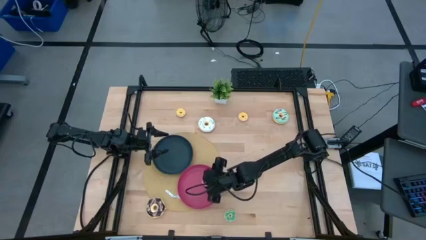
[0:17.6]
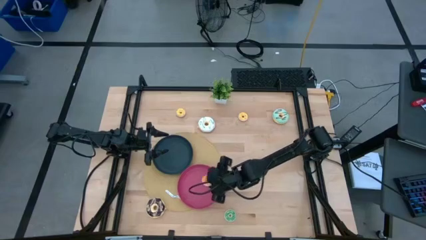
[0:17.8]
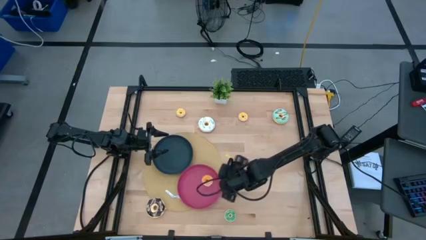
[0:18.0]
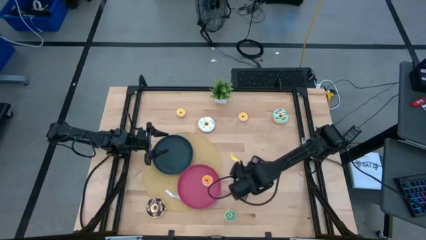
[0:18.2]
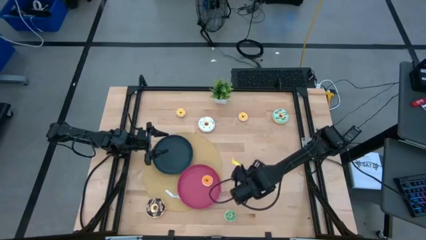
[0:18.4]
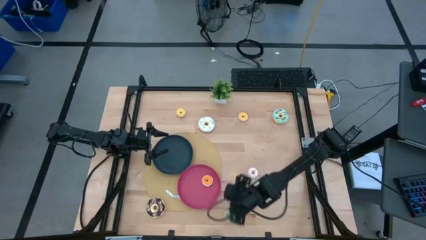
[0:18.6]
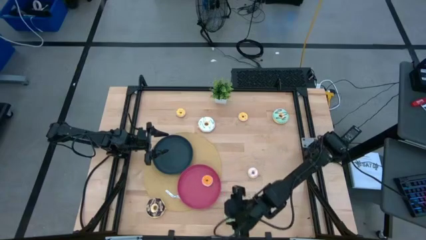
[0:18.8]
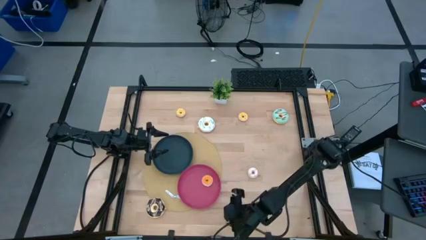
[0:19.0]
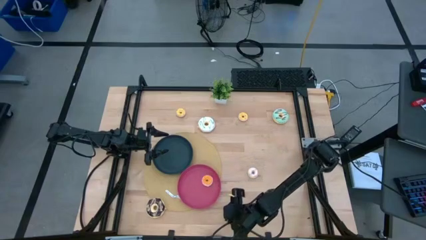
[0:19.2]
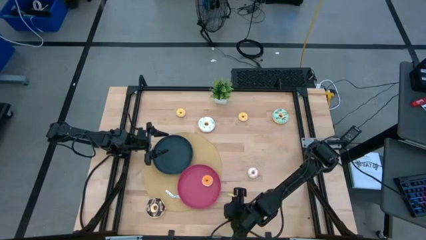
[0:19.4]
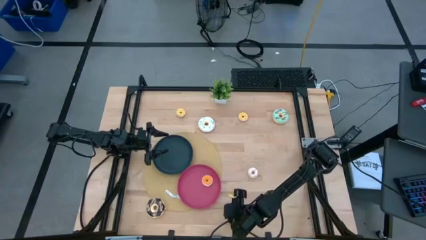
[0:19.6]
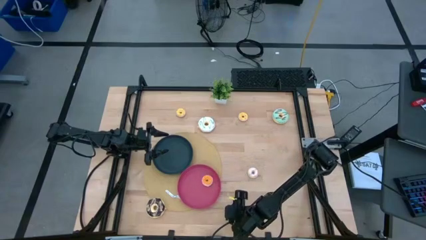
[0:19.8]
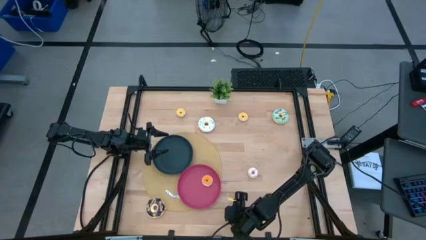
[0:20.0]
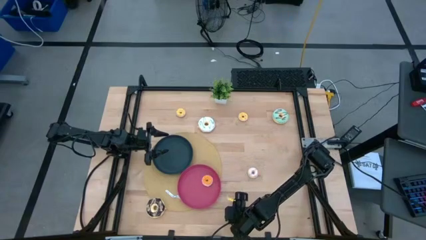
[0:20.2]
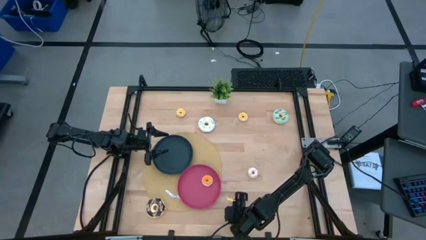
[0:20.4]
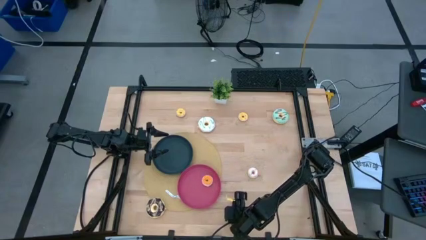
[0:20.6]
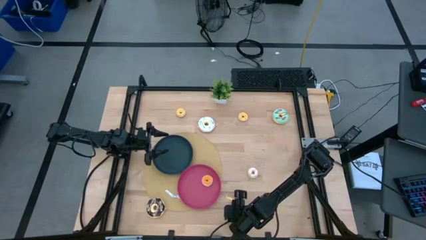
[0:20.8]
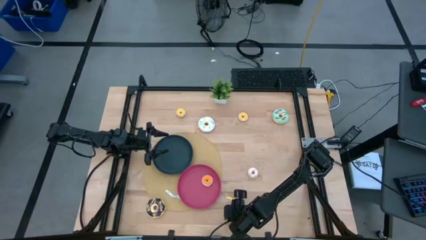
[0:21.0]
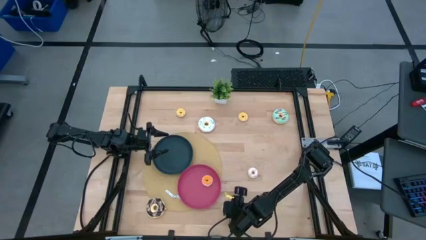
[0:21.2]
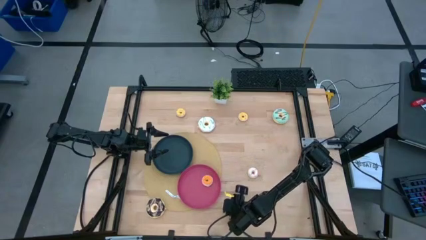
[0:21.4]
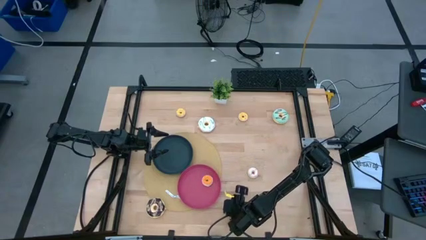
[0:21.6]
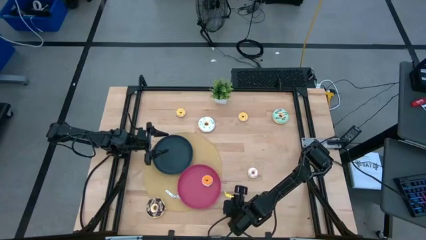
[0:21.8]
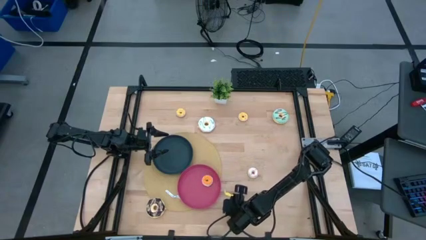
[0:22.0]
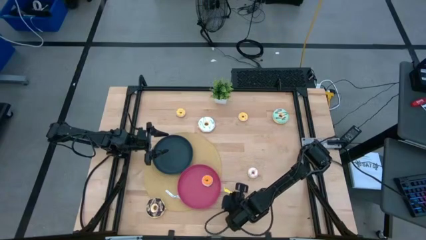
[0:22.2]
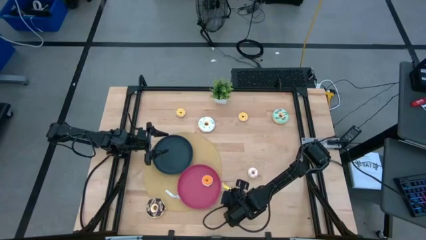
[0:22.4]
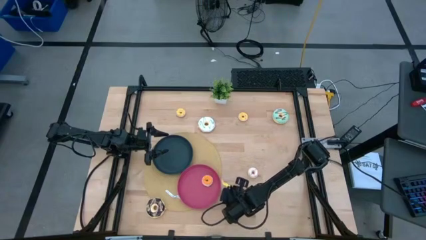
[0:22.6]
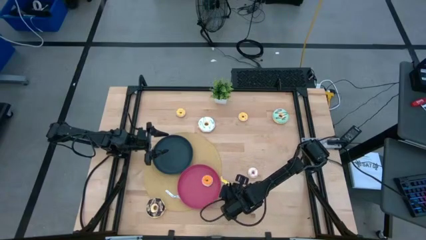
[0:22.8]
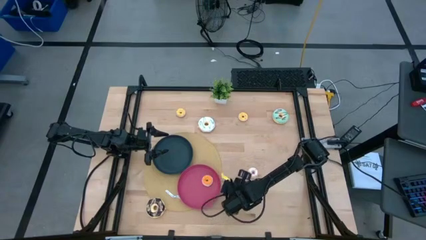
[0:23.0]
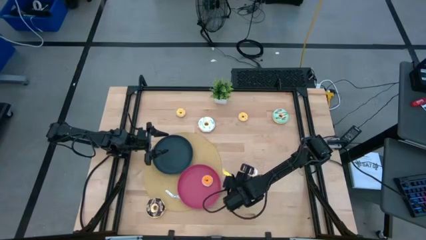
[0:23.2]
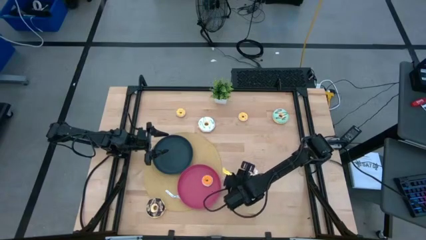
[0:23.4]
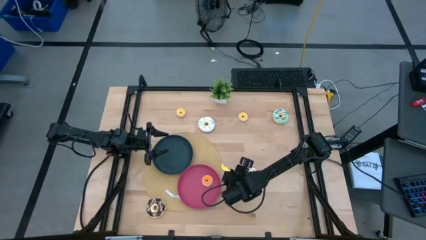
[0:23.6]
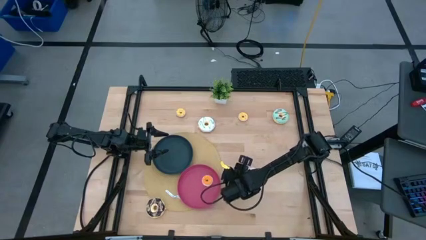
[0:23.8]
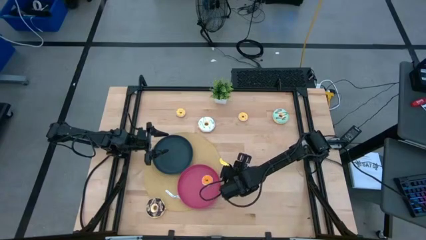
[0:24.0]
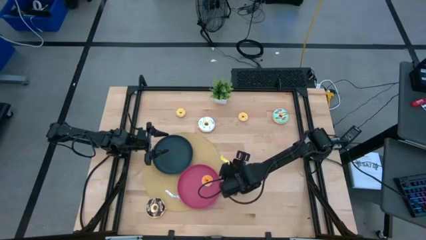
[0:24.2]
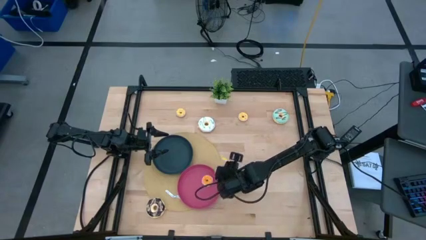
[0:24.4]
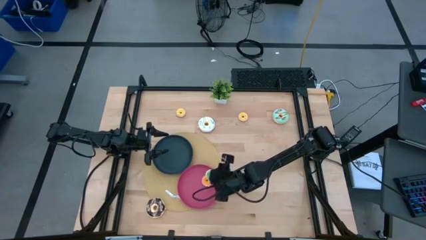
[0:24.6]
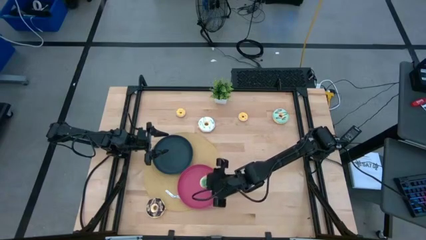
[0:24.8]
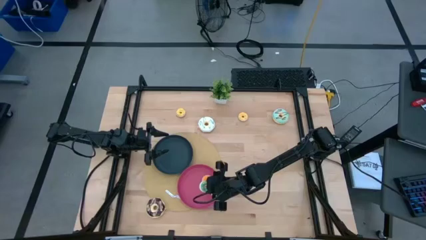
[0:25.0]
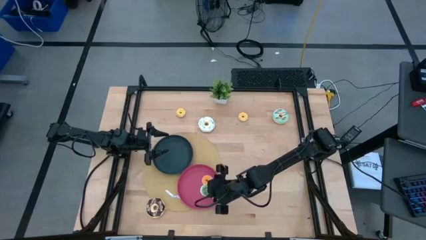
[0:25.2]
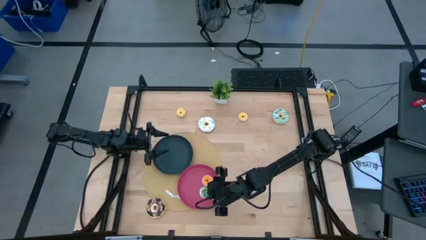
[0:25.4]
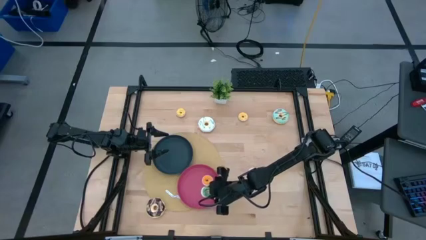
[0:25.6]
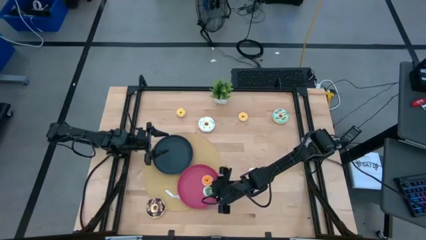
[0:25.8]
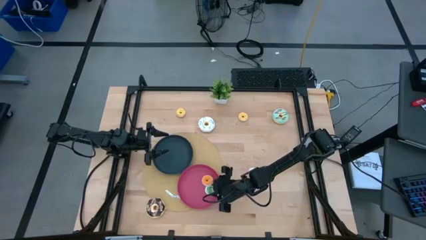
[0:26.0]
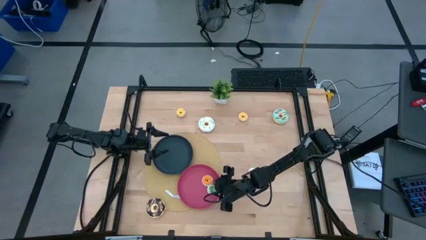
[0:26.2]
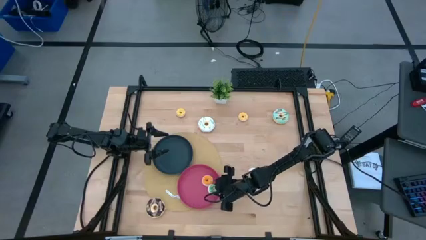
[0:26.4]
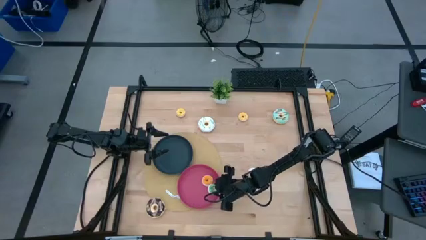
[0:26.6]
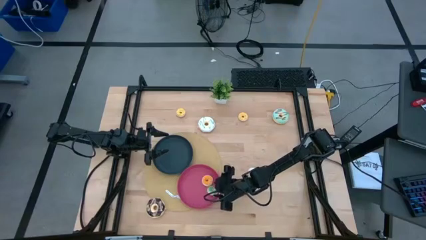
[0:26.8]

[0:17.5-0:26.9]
Task: Pick & Place donuts
Put the small green donut into the pink plate

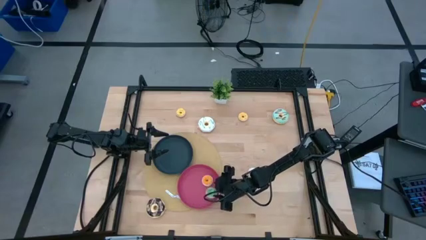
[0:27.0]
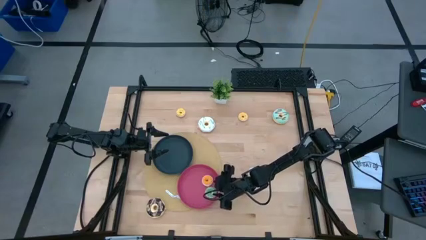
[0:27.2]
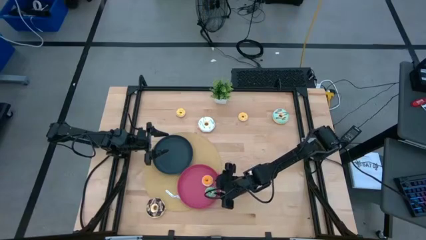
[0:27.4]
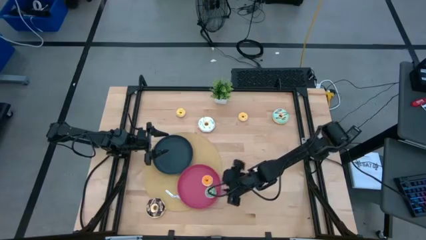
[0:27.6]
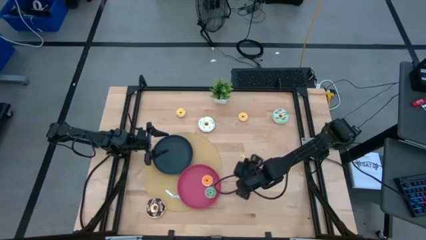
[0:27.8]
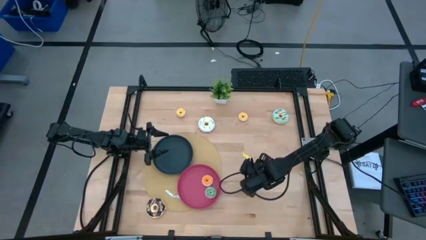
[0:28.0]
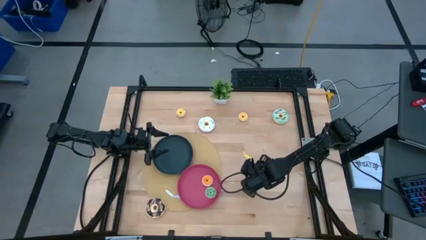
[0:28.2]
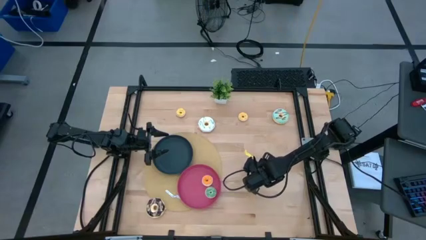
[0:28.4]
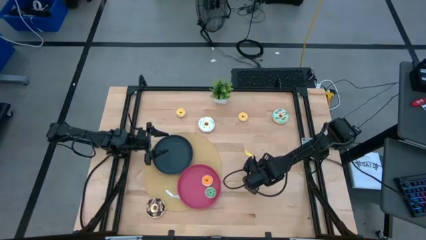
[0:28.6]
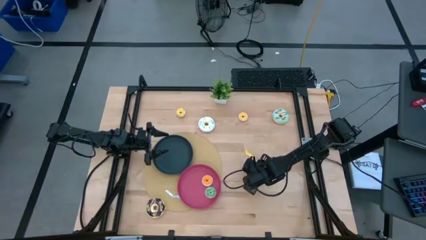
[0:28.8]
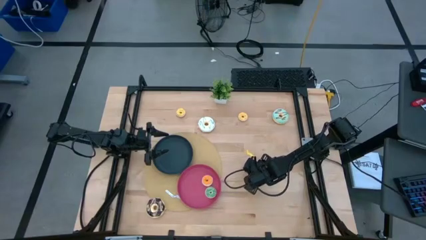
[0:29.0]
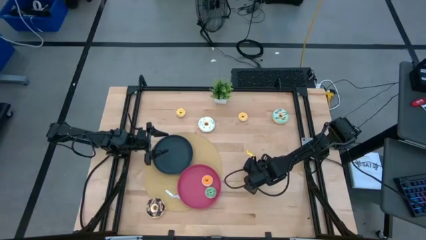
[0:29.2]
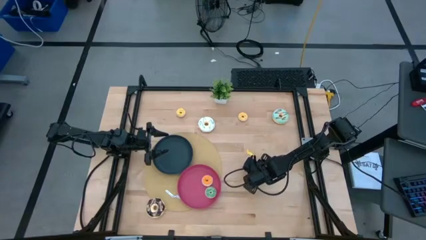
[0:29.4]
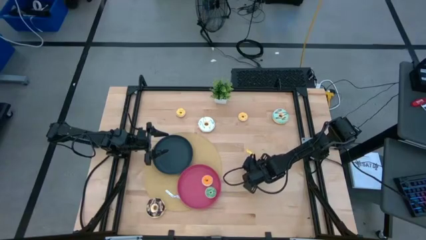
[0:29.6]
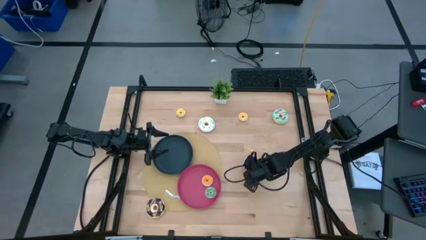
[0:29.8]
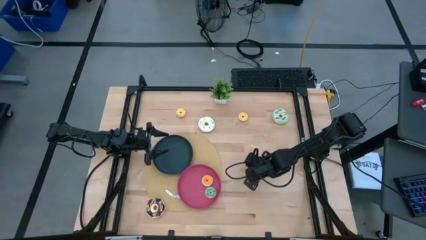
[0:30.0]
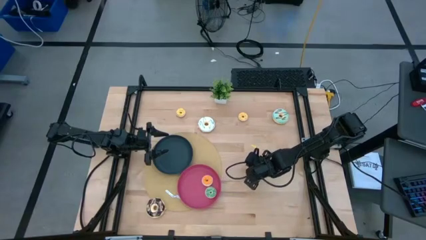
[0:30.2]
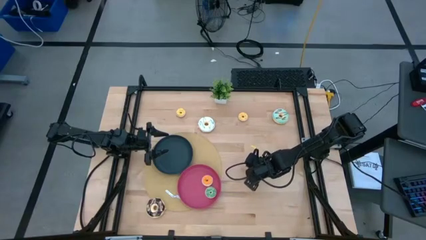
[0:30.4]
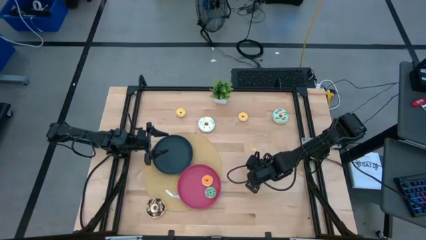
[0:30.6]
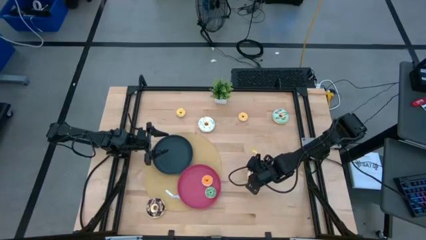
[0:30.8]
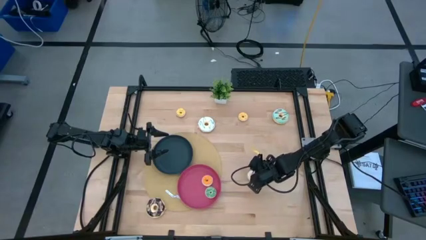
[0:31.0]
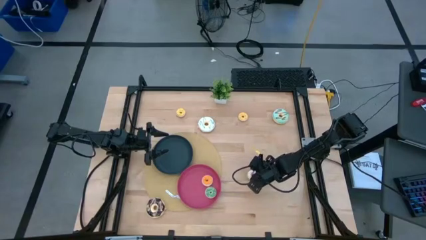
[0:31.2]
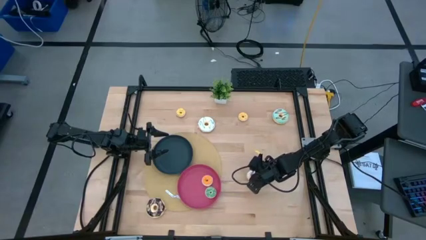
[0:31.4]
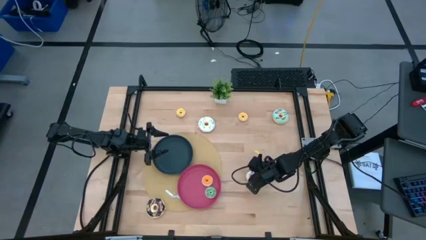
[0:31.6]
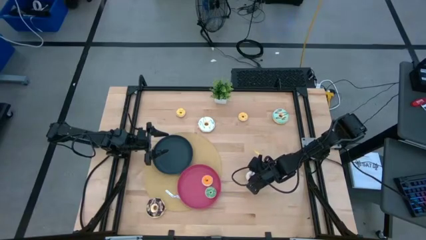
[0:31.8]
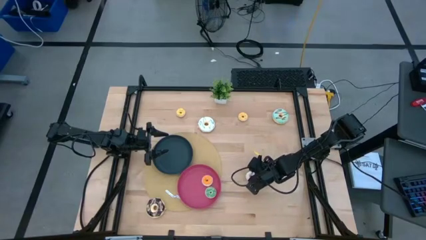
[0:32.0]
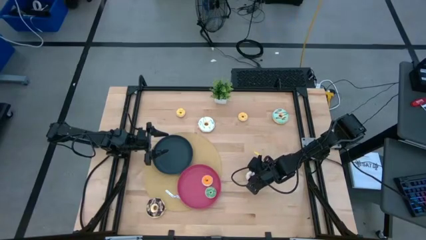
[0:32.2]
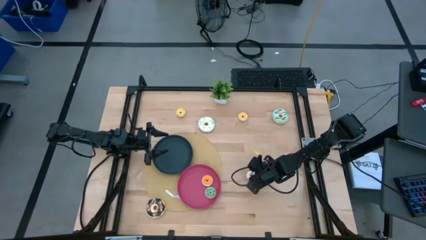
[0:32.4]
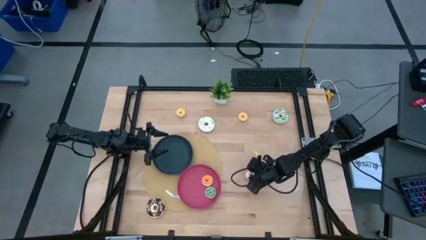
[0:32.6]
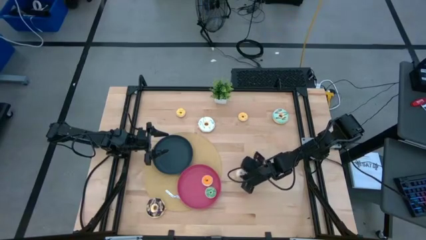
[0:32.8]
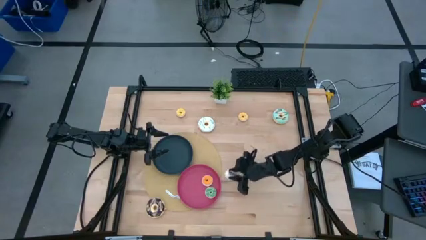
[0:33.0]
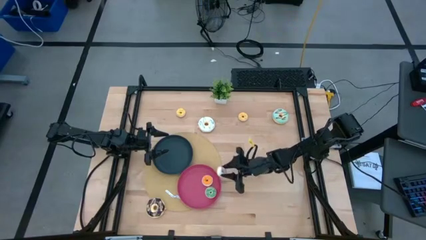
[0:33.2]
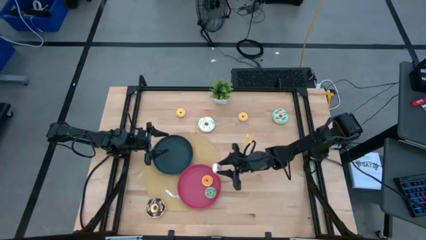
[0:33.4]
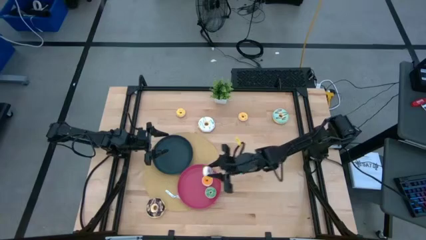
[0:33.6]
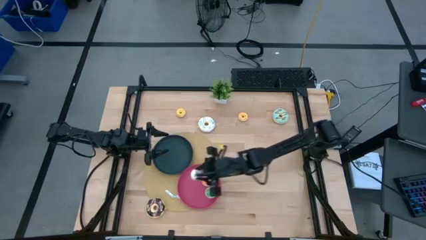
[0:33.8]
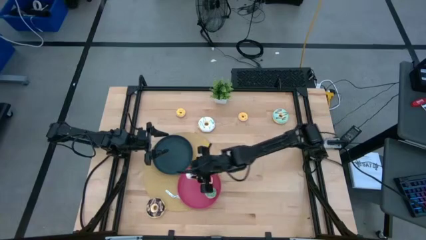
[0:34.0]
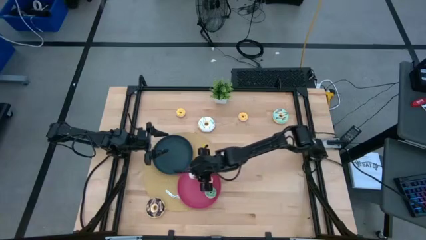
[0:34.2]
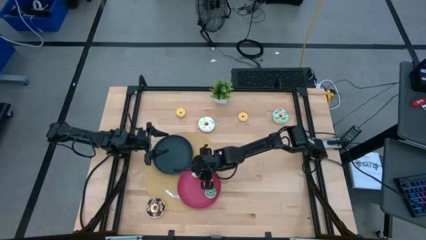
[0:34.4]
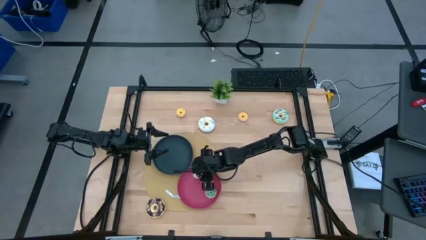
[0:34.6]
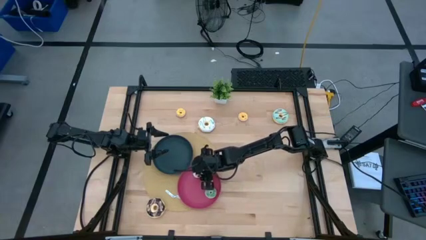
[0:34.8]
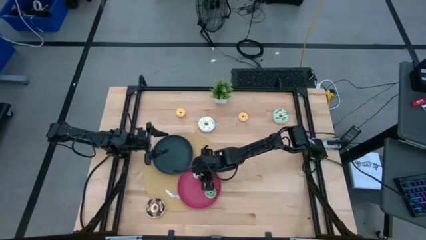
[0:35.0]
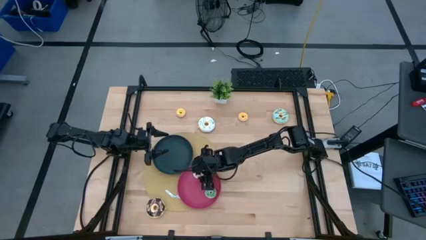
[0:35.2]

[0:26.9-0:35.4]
Put the small white donut into the pink plate
